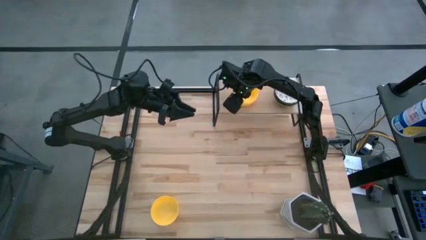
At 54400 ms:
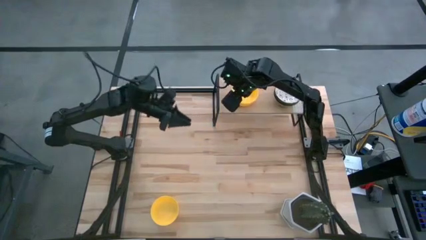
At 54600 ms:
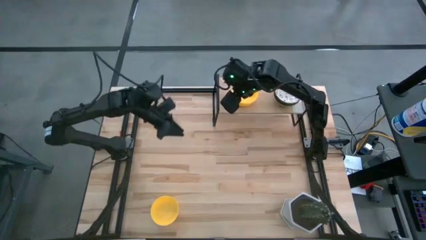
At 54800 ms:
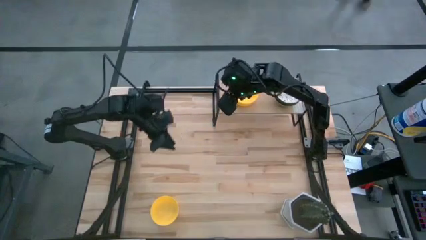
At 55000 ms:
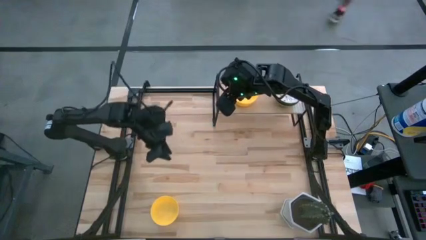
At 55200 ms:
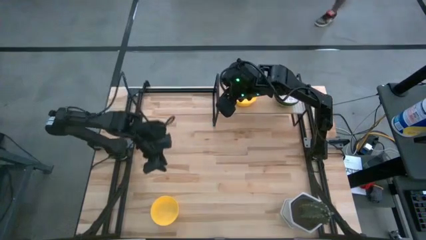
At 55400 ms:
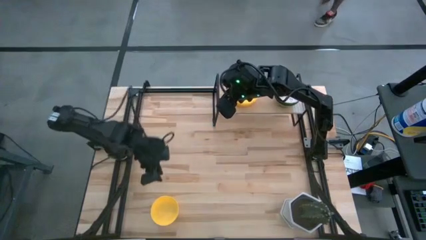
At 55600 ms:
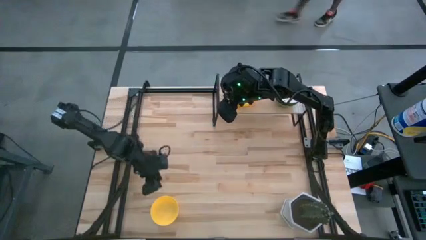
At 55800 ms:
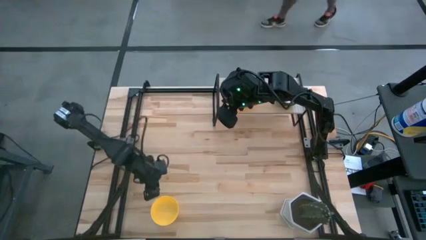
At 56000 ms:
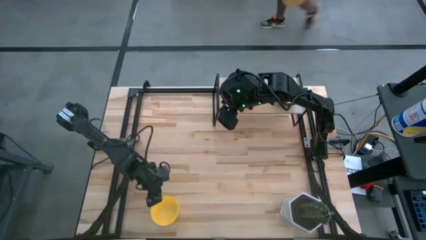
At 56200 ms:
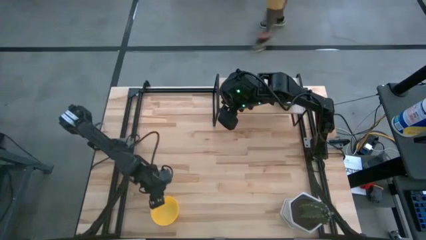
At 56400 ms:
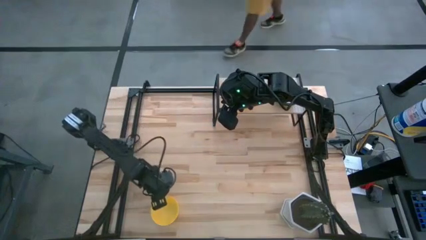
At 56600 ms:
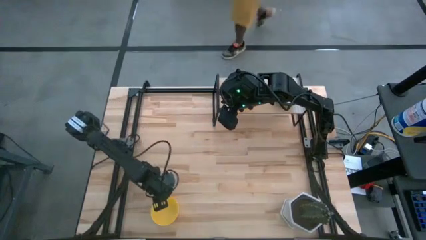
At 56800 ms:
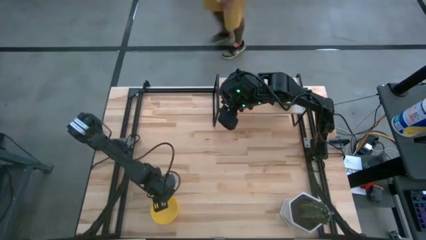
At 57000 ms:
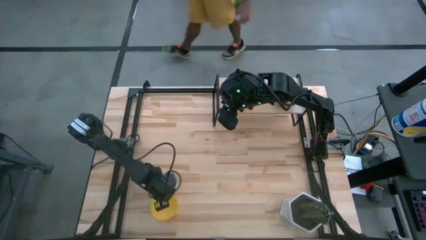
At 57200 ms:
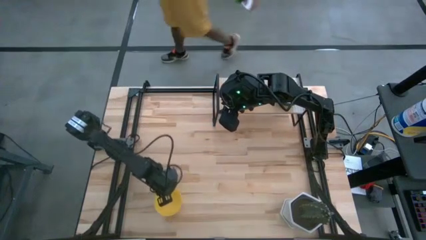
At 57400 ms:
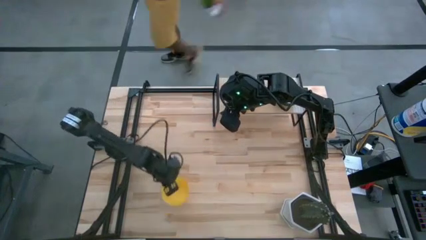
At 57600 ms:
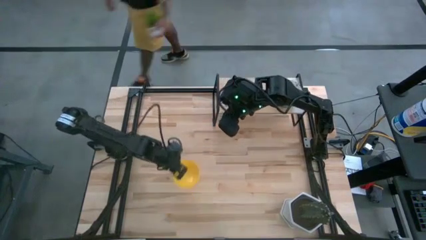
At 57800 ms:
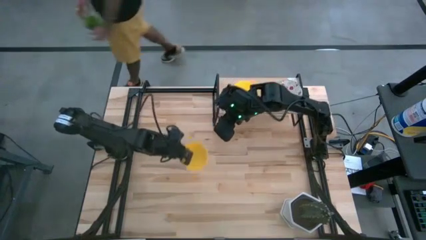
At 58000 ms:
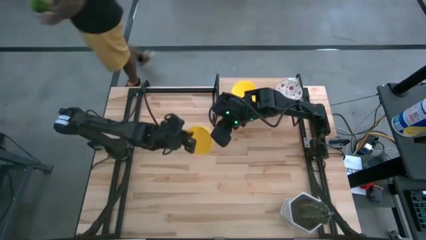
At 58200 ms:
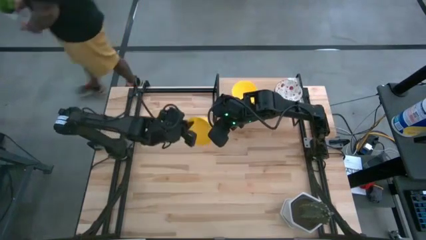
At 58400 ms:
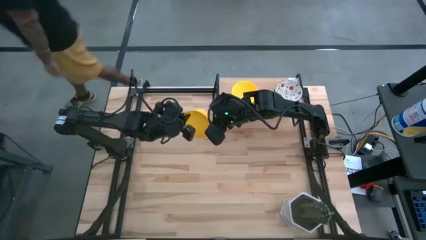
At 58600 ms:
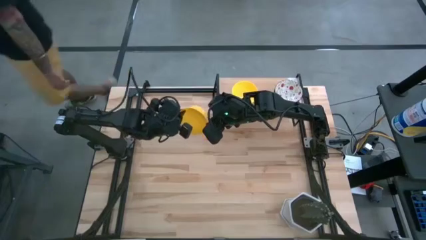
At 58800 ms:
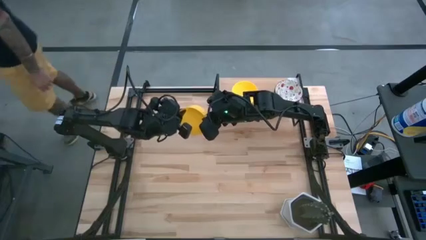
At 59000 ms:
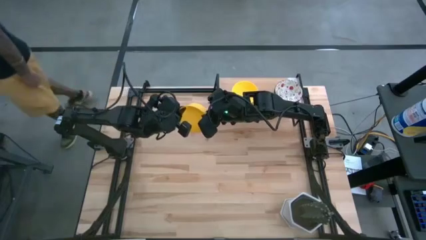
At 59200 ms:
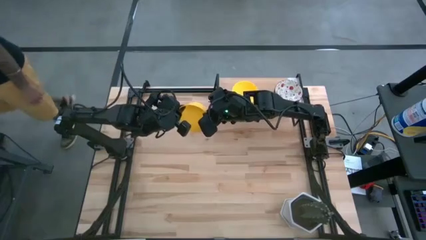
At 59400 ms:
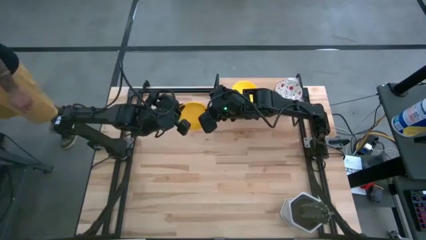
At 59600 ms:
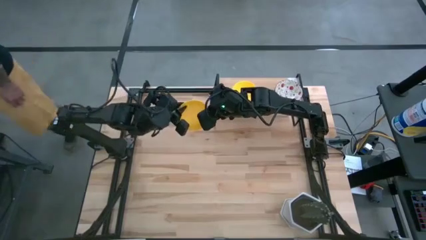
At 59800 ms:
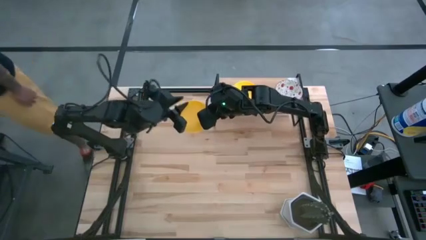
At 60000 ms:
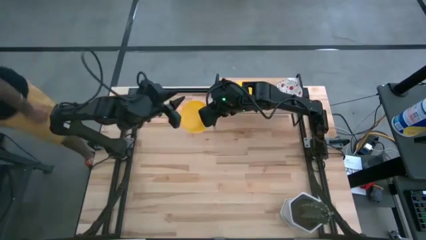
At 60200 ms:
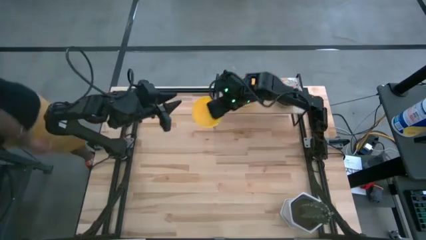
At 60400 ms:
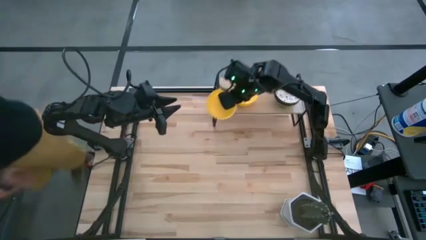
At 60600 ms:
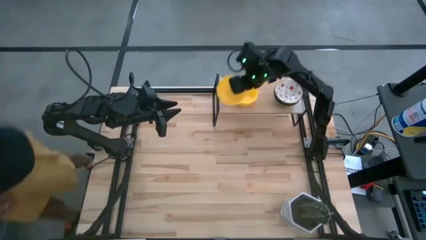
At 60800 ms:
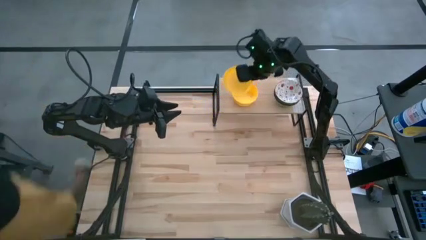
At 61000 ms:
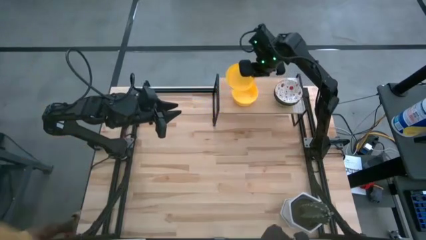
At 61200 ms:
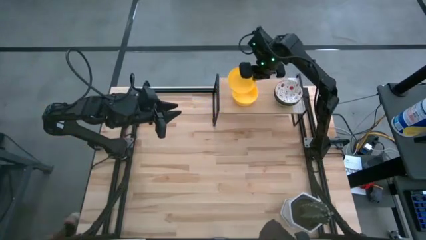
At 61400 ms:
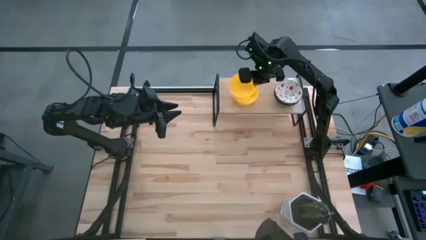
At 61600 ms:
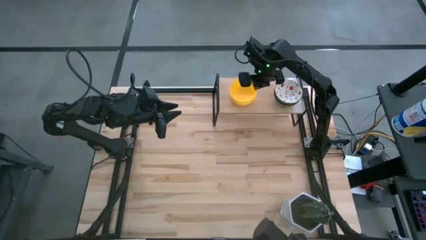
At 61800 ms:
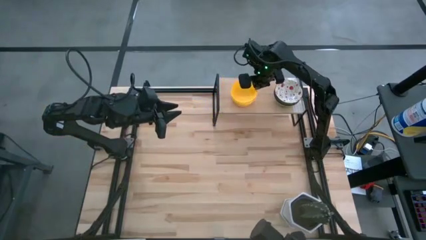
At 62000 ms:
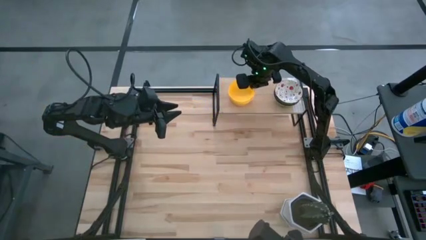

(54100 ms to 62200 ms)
Task: Pick & Place Mini bowls
Stack the yellow bowl on the yellow bowl on the shelf

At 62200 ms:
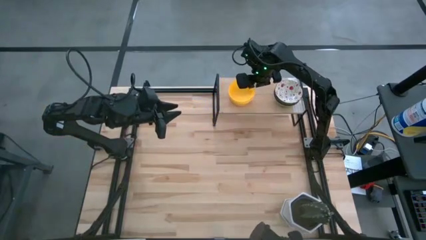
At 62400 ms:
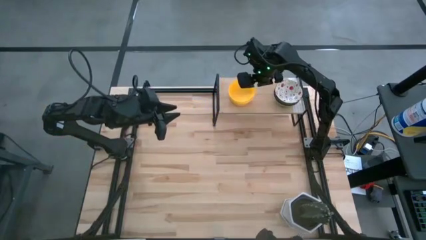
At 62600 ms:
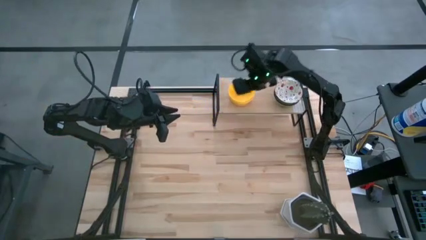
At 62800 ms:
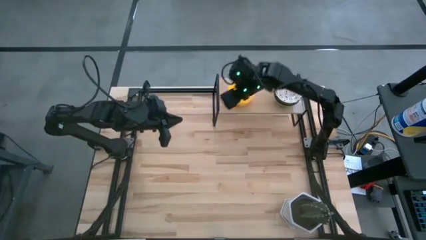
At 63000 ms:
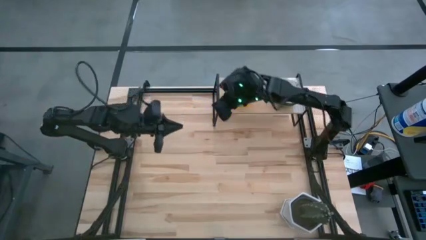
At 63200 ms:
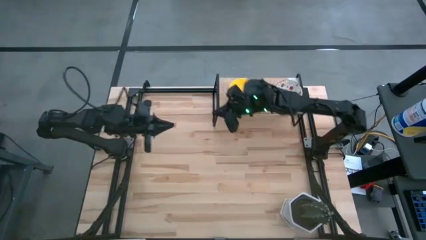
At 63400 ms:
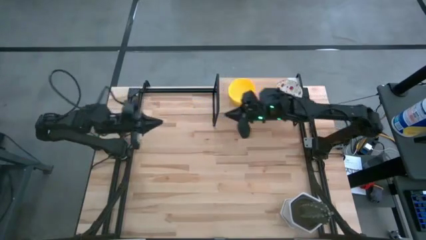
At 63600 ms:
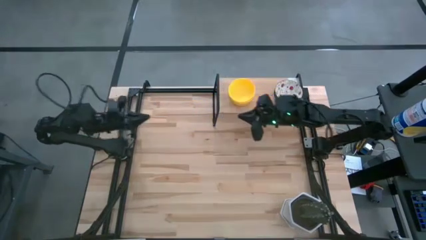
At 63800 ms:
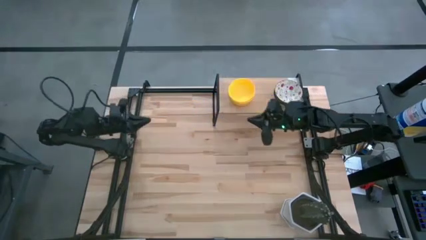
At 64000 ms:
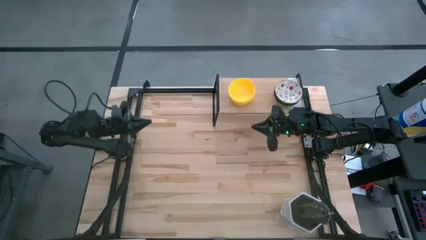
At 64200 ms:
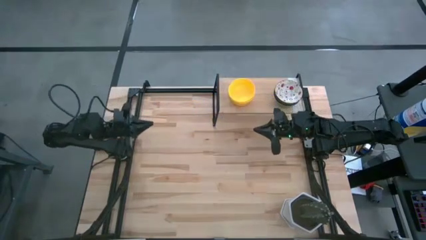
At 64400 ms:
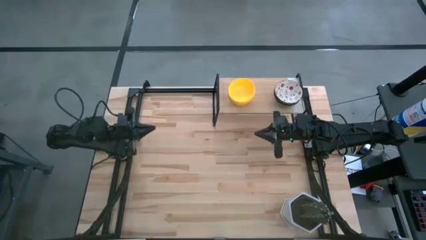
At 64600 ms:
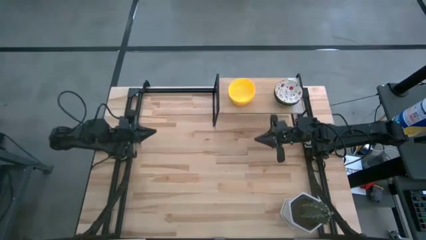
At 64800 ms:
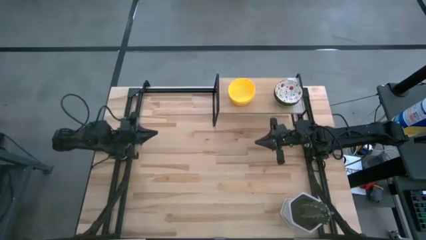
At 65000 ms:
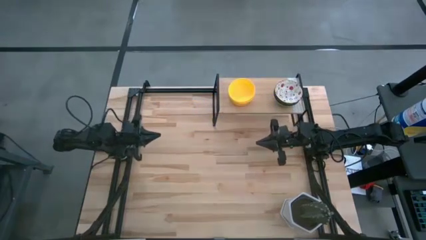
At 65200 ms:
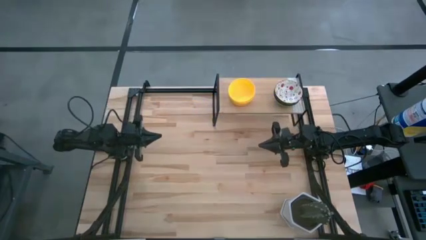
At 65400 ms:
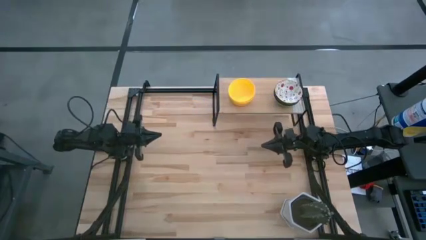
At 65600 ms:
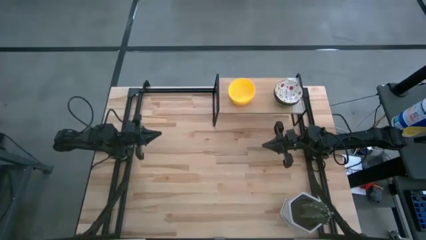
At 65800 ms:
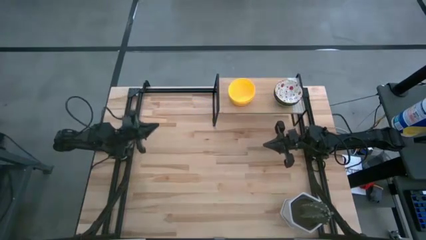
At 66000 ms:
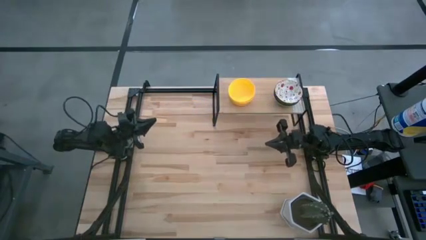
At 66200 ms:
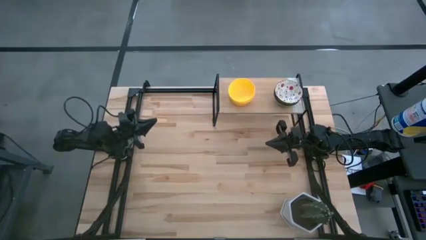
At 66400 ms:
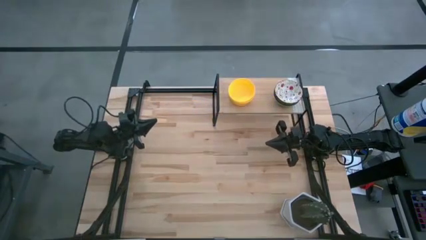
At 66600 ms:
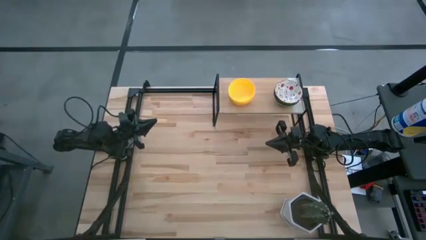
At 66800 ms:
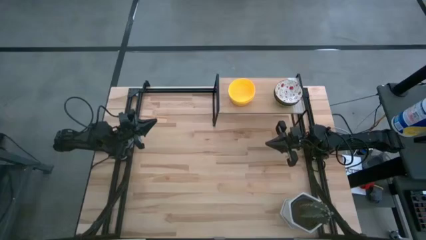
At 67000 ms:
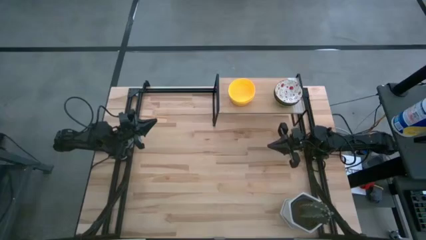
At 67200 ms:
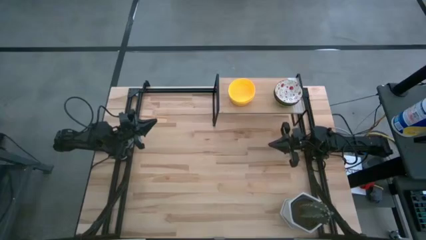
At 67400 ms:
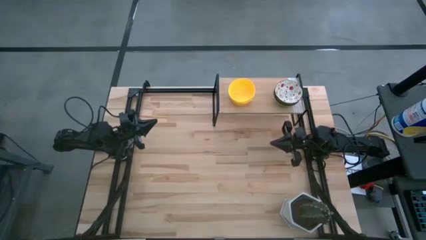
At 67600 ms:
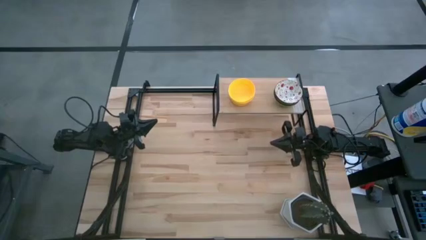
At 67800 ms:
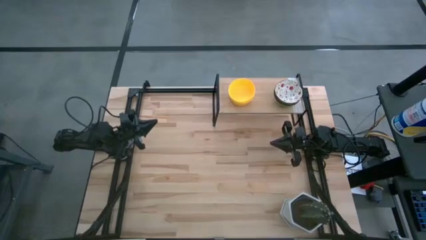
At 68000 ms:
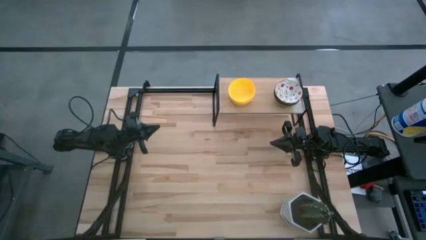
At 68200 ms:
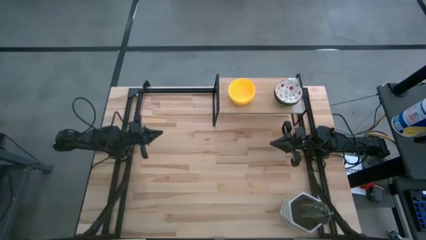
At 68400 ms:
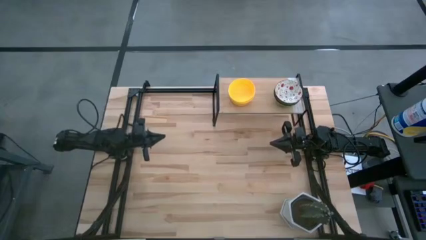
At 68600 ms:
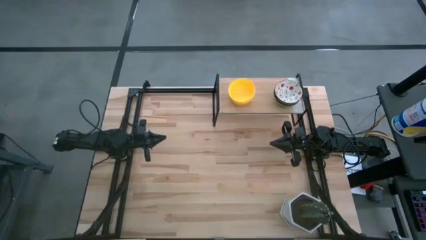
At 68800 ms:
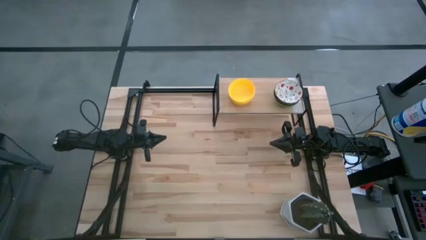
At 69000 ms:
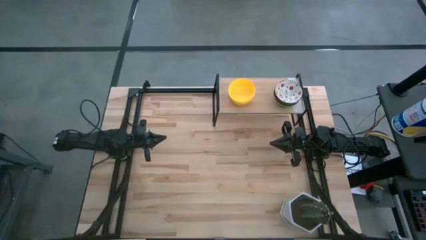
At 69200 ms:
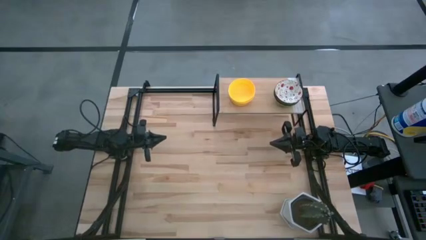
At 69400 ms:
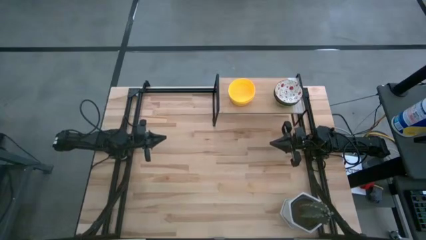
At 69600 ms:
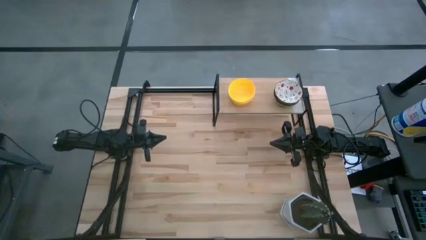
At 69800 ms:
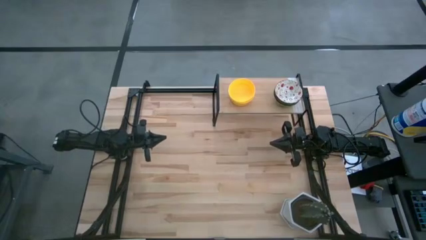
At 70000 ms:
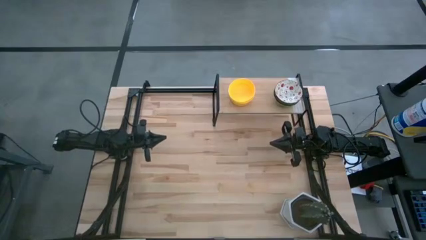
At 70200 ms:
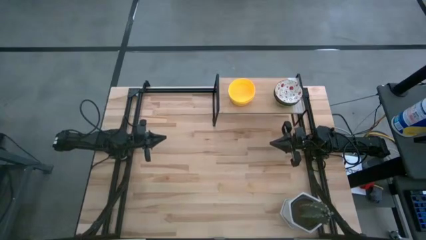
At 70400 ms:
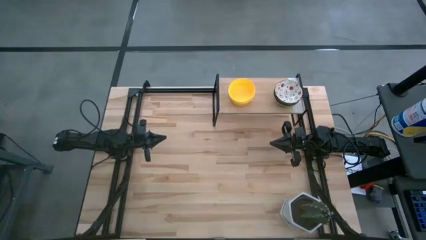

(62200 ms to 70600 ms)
Return to Home Position
